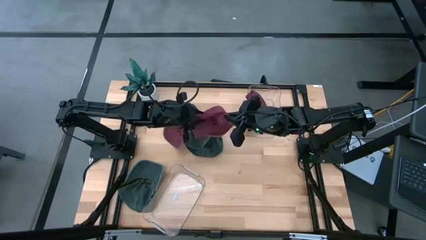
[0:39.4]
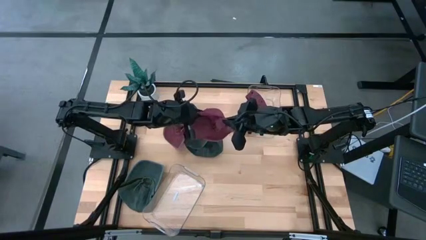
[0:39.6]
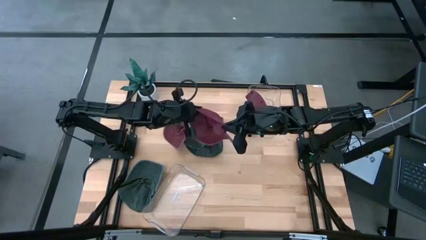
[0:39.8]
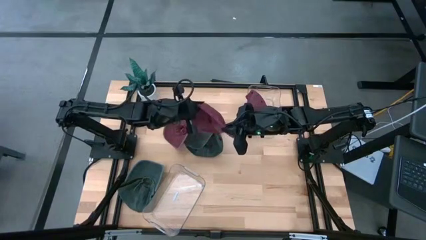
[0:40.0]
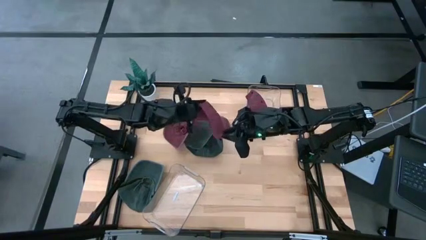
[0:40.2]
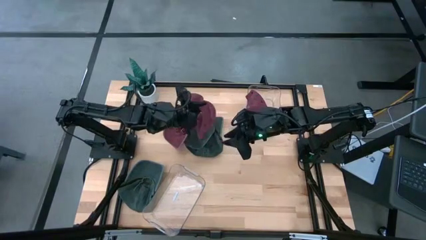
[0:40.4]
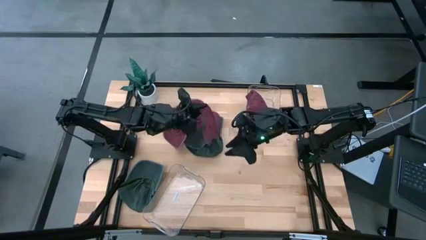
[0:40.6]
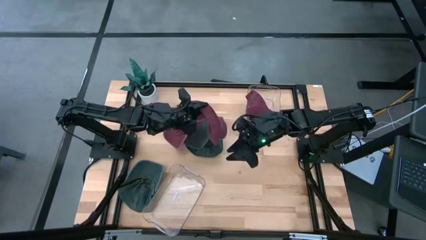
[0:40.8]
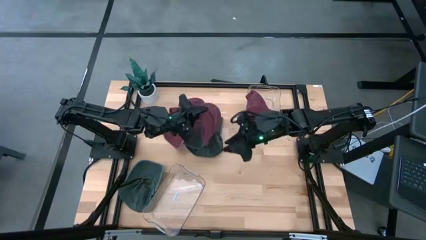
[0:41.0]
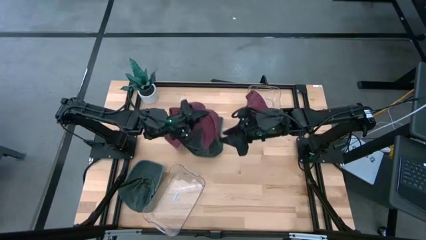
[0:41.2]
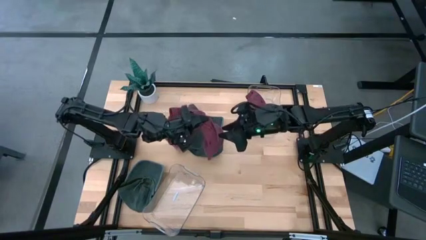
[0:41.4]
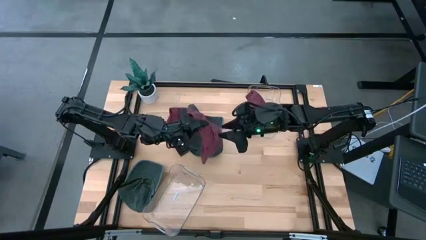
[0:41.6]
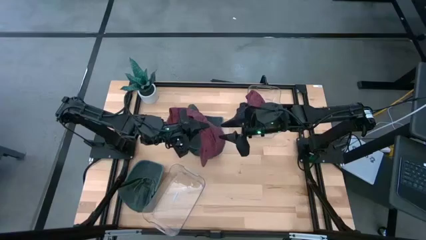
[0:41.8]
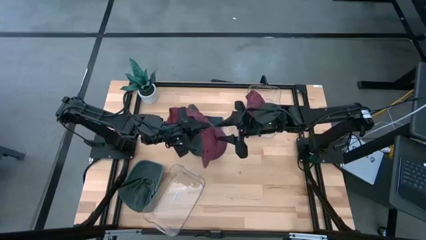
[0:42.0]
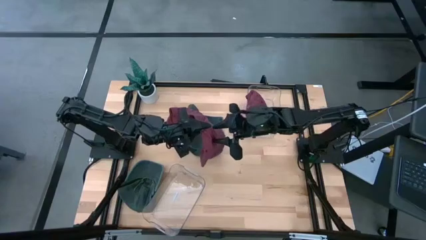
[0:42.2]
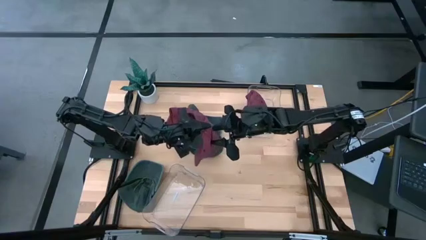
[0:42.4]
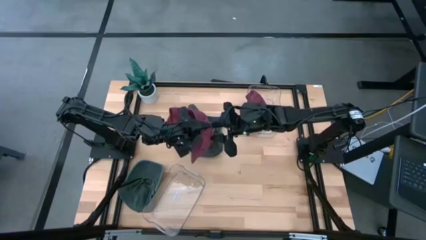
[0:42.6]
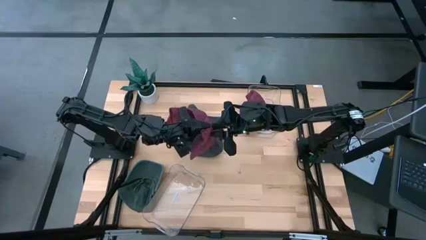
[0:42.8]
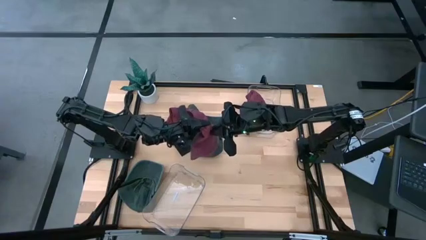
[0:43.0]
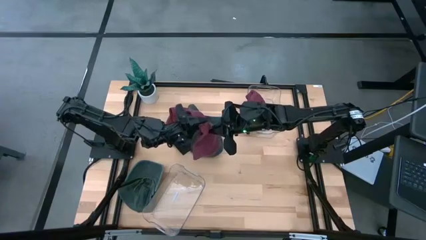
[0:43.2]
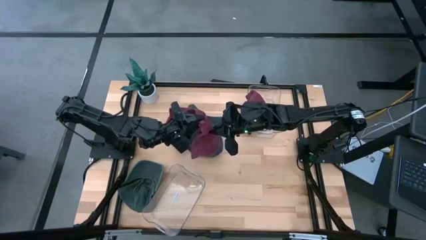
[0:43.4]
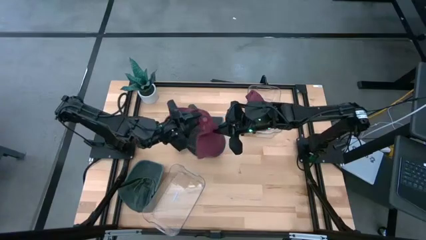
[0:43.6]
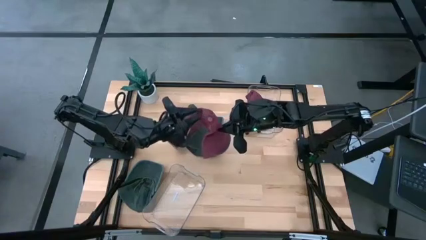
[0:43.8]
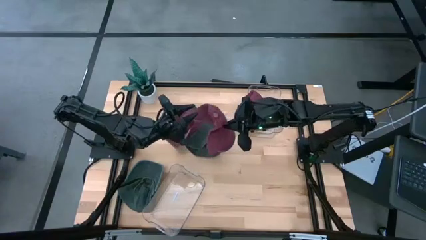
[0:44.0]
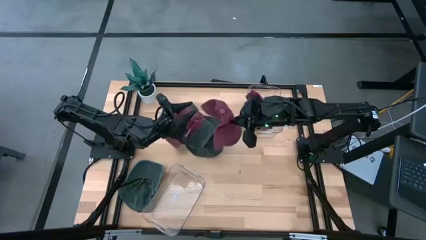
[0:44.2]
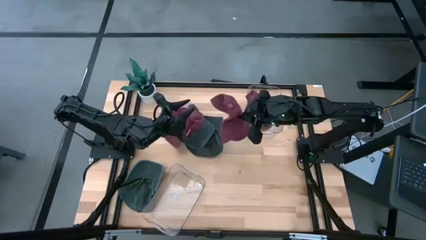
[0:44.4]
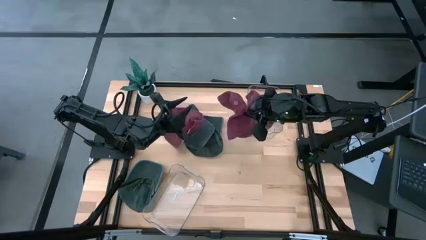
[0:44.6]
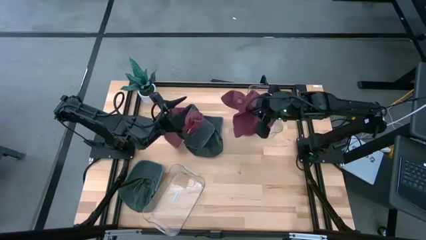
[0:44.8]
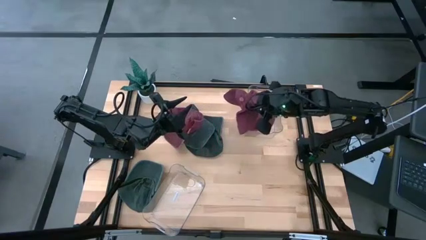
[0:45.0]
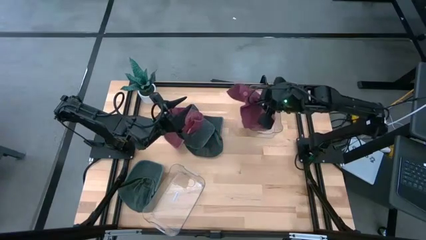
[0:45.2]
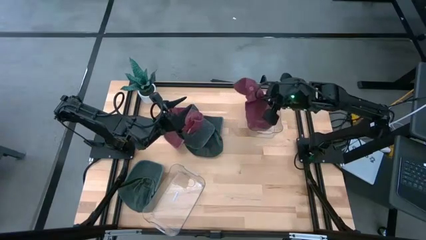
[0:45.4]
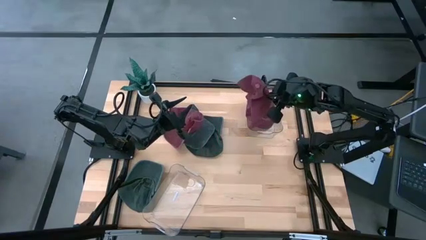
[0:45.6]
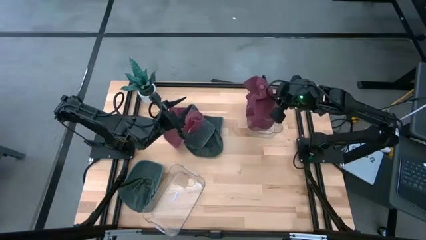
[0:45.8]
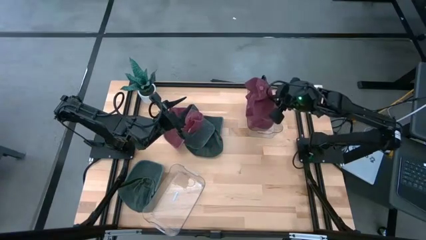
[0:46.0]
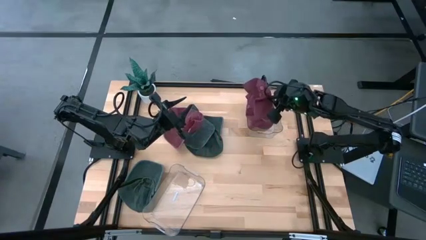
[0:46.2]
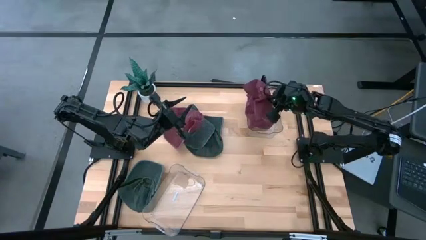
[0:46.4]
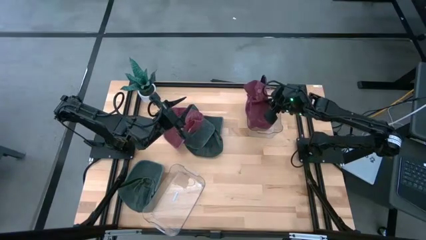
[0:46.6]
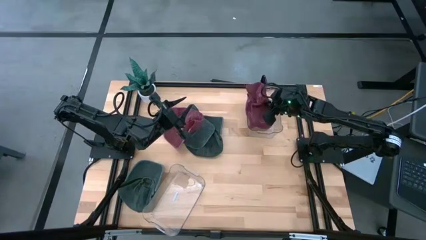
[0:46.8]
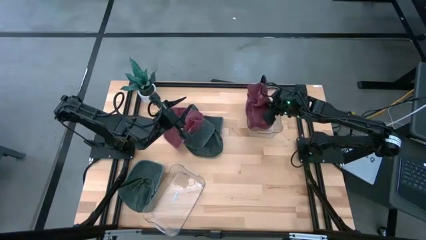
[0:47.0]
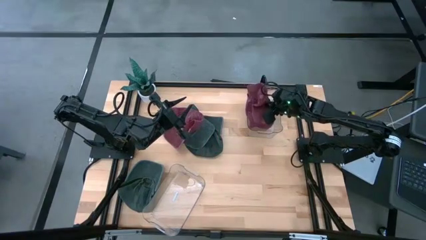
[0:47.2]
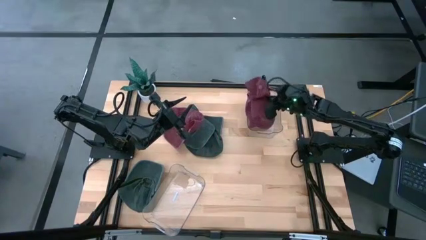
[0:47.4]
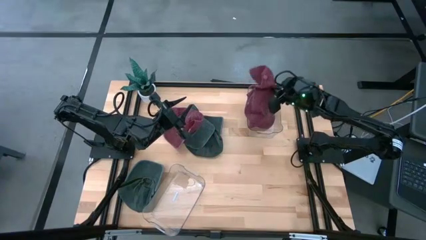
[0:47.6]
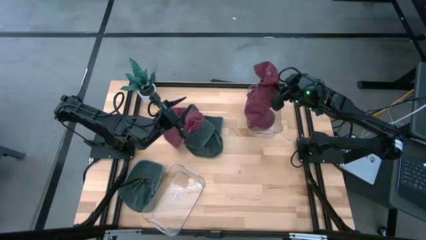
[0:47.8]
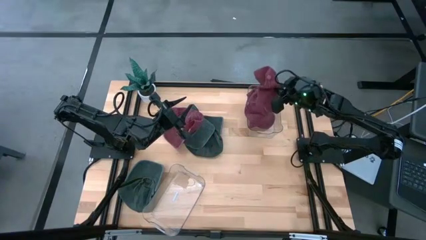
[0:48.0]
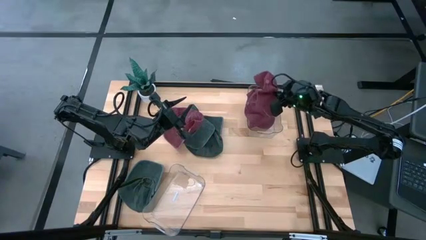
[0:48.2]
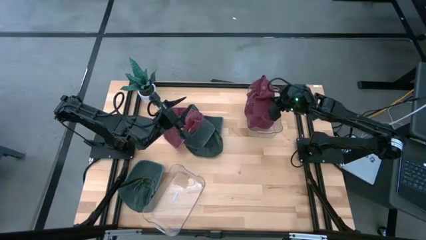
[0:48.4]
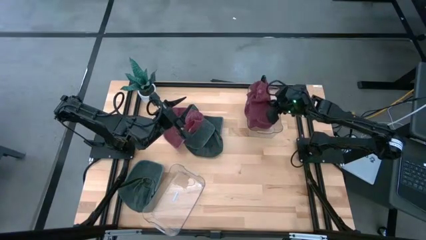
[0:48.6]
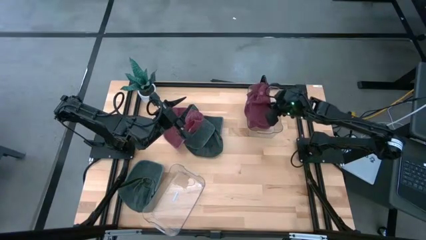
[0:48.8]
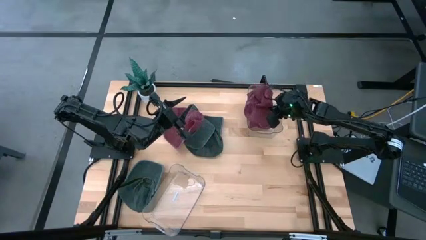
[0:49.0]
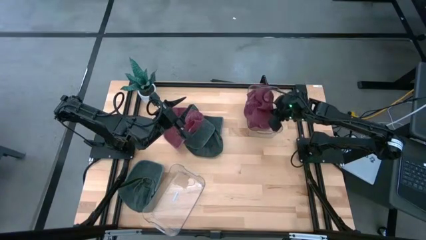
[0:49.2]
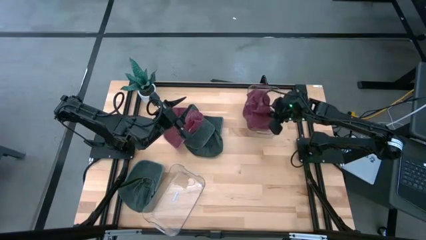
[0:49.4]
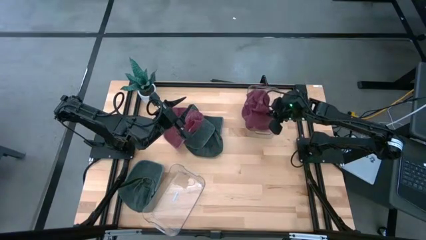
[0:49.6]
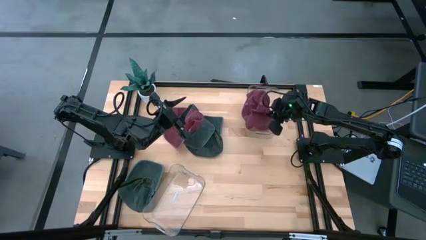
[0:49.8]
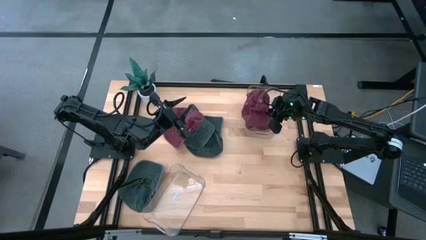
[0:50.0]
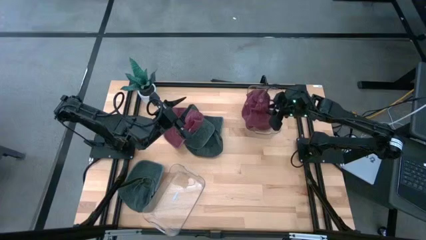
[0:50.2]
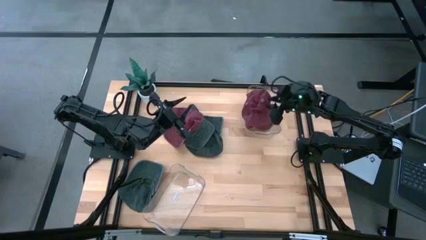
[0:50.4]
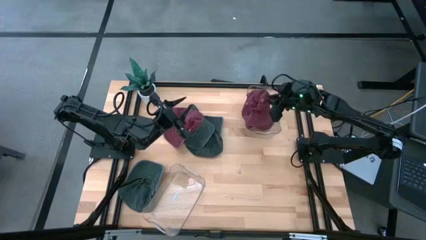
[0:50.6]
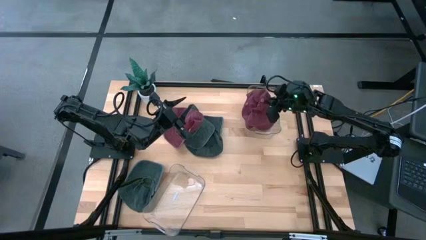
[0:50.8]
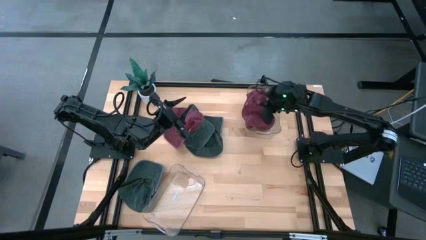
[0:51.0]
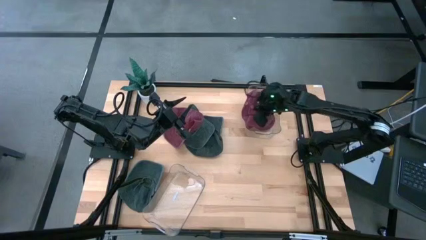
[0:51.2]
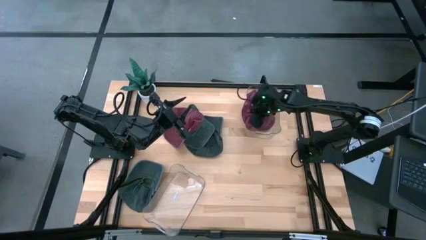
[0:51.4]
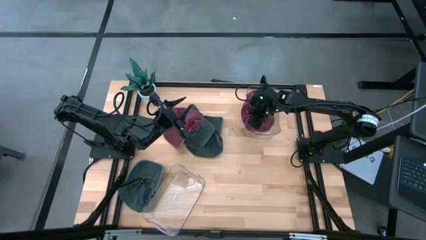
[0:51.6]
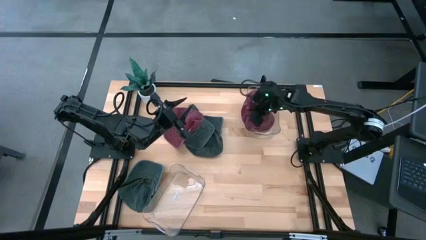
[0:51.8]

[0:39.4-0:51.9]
Task: Pick & Place hat
Put the bottom red cap into the top transparent bin

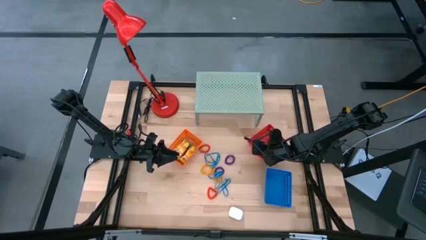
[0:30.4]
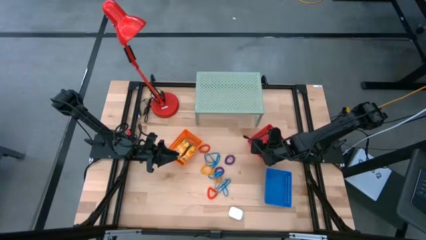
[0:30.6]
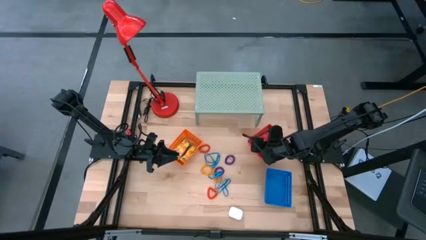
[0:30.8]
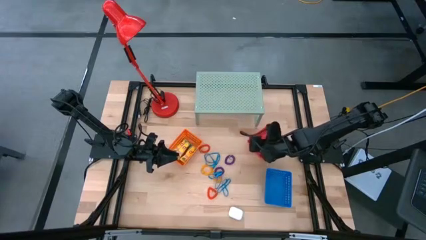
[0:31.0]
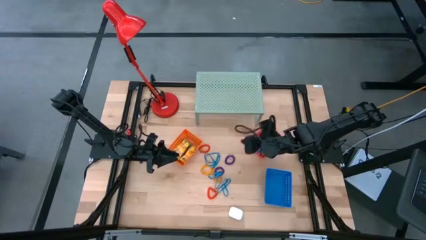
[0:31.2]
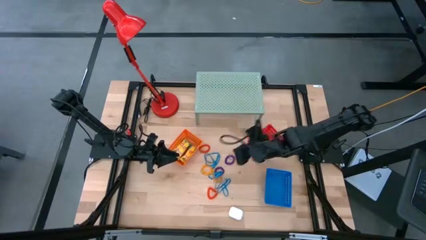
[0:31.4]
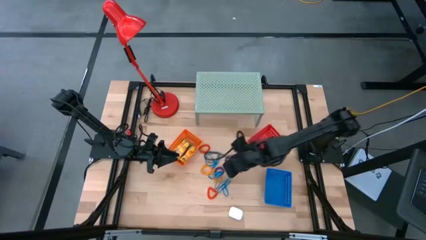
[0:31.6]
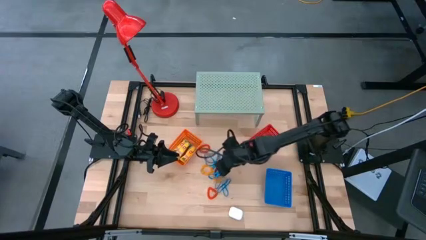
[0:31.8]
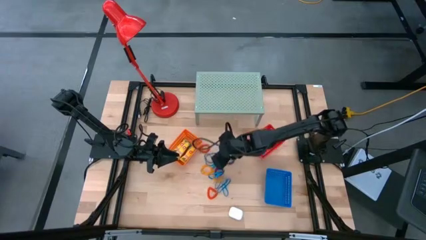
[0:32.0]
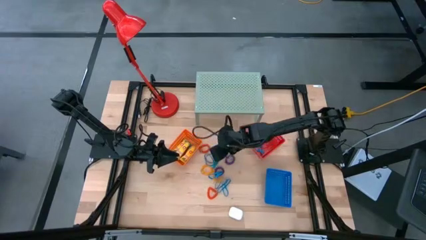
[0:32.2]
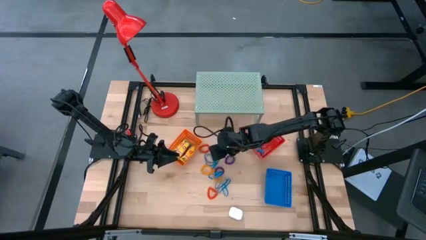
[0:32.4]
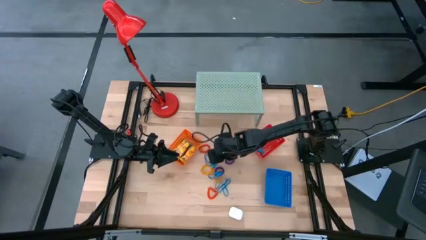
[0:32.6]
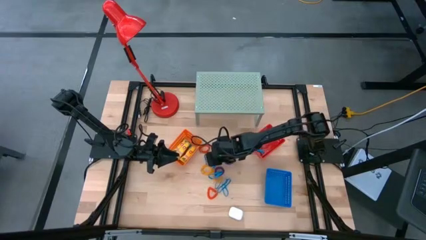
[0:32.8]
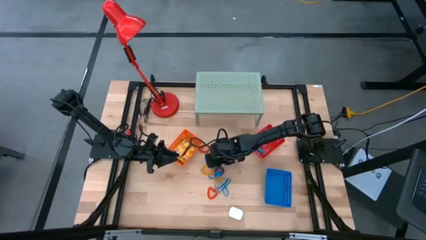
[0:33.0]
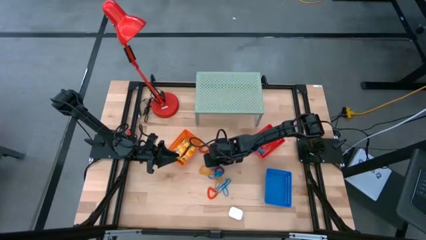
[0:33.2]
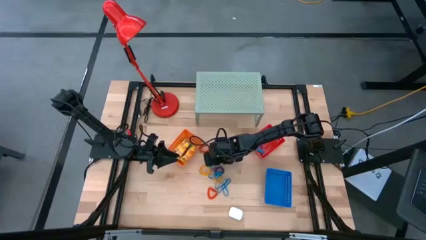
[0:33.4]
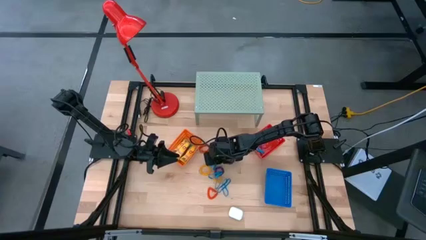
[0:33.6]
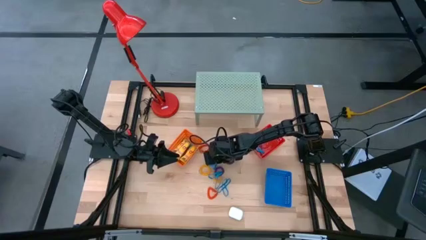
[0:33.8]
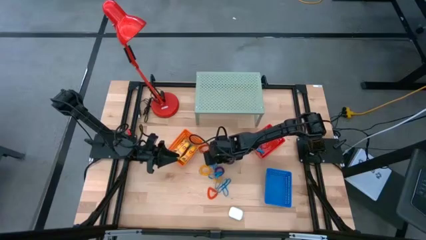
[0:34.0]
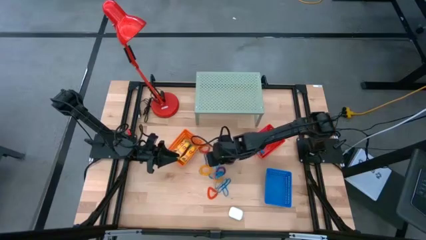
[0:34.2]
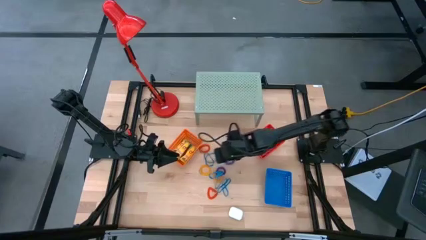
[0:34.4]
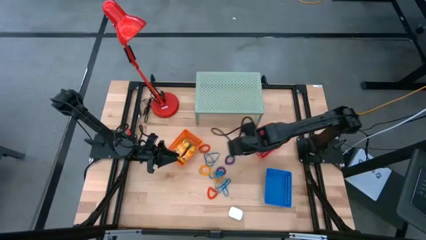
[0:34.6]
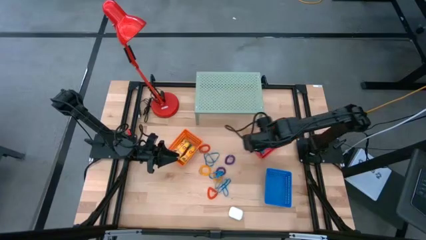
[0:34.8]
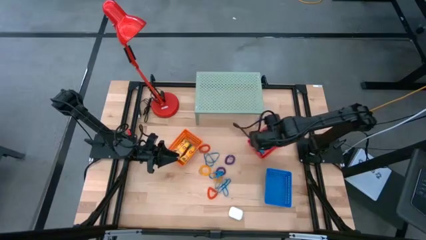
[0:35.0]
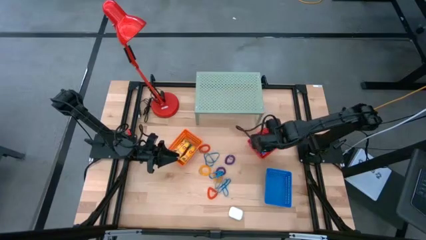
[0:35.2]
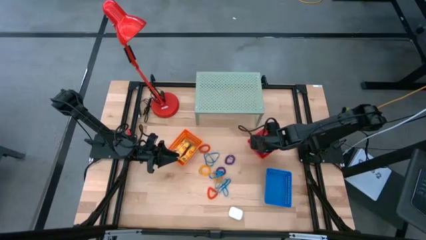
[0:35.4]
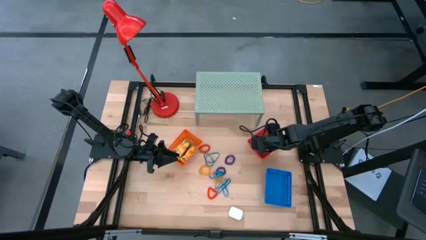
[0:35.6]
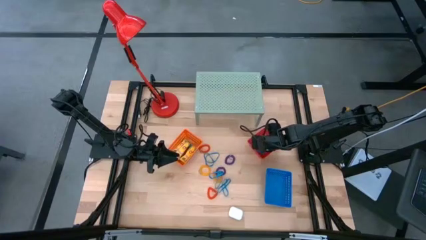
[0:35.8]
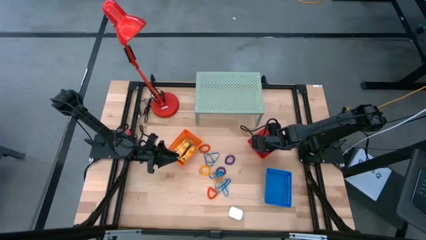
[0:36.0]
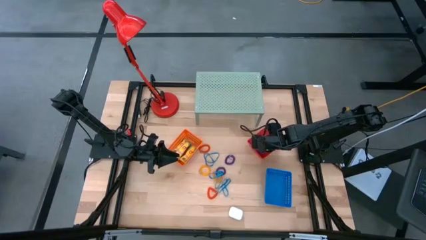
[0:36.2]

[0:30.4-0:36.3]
Task: Pick & Place Office Desk Supplies
Put the blue rubber band into the red bin
